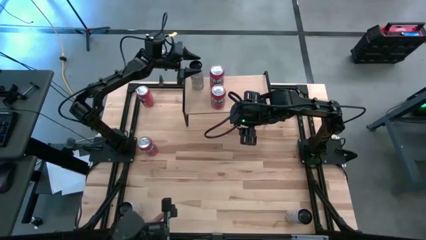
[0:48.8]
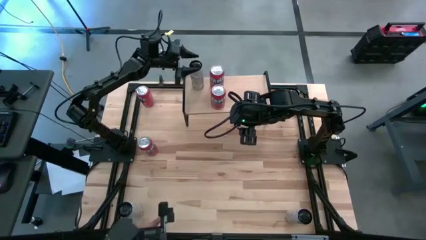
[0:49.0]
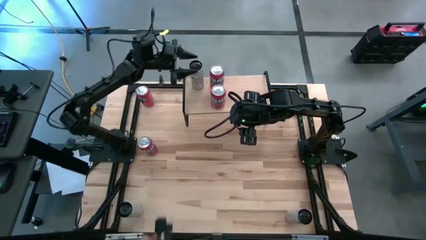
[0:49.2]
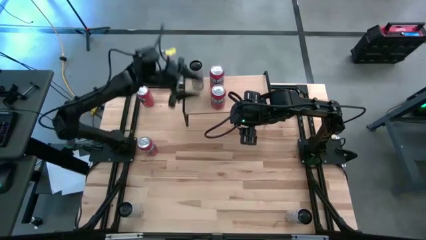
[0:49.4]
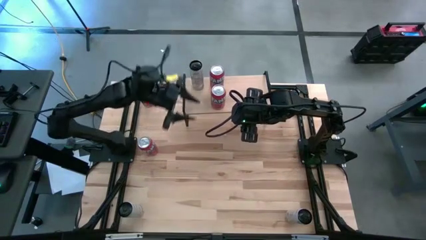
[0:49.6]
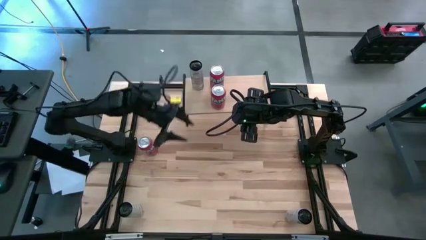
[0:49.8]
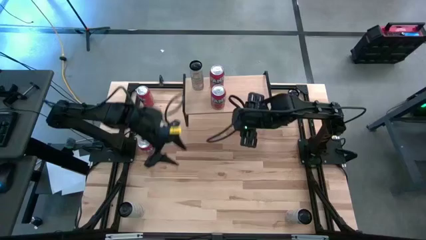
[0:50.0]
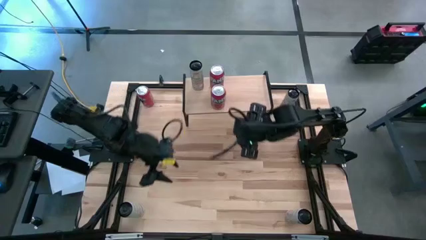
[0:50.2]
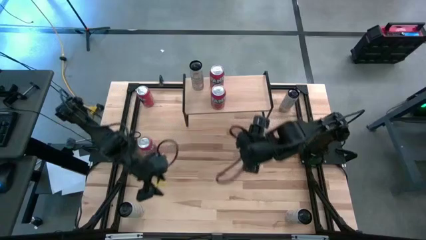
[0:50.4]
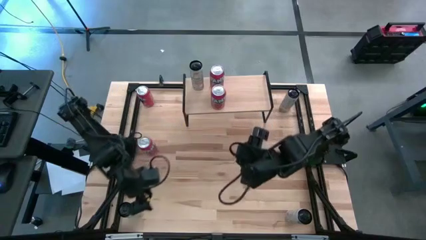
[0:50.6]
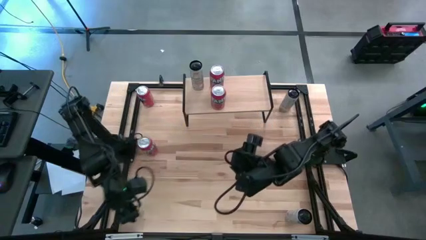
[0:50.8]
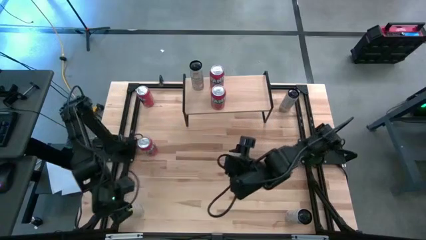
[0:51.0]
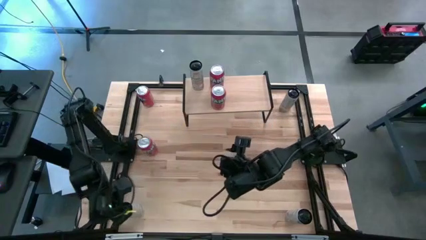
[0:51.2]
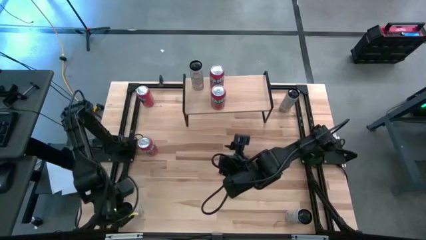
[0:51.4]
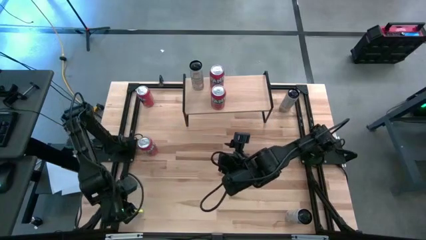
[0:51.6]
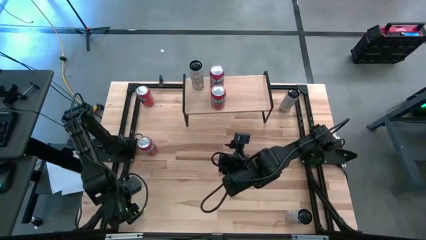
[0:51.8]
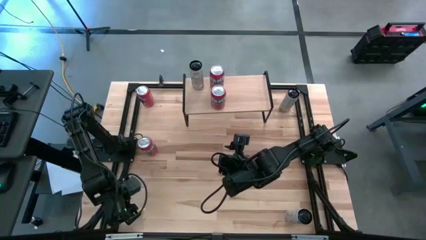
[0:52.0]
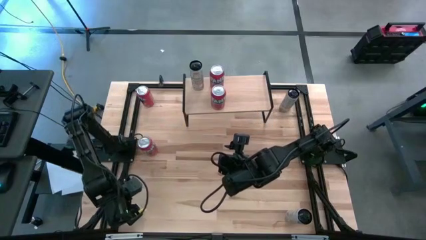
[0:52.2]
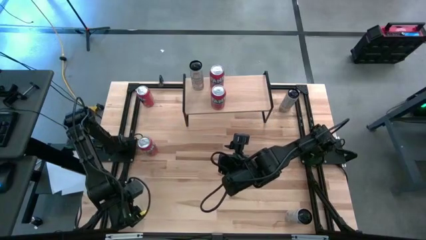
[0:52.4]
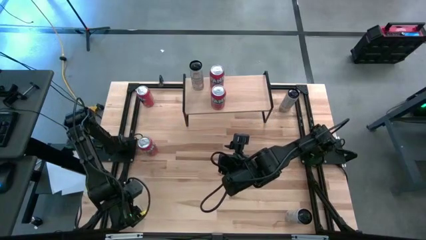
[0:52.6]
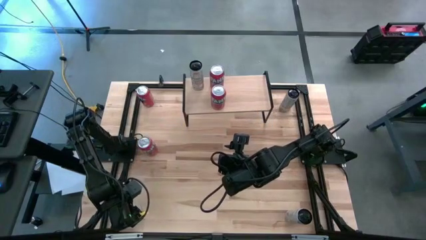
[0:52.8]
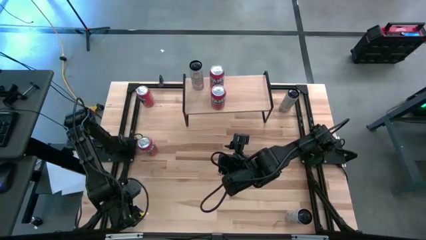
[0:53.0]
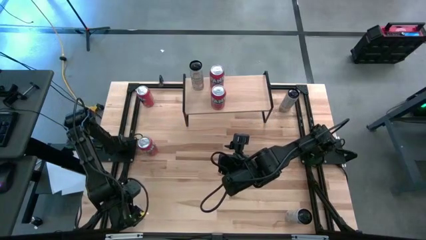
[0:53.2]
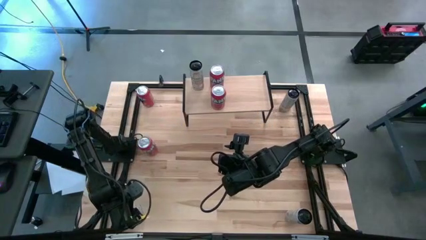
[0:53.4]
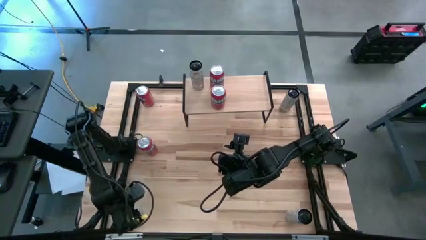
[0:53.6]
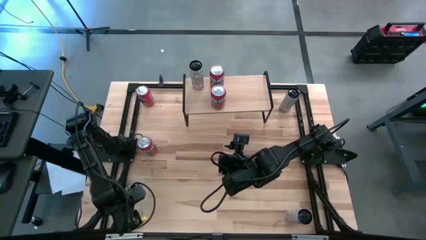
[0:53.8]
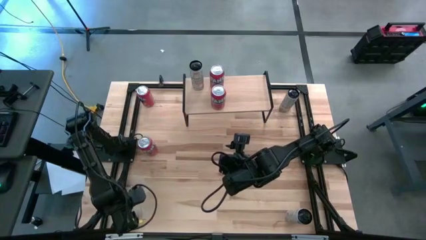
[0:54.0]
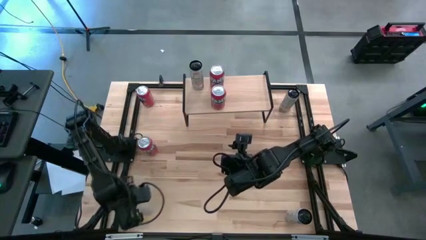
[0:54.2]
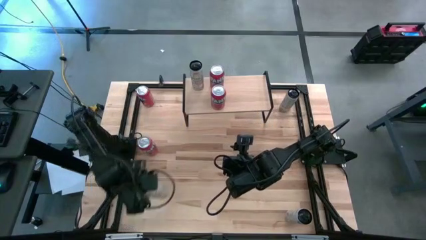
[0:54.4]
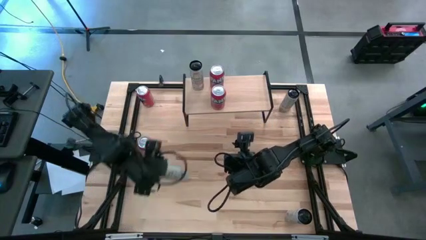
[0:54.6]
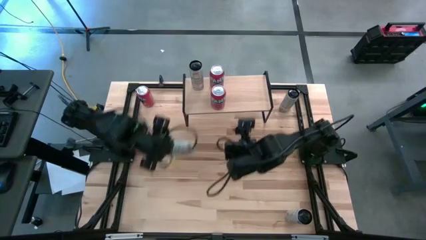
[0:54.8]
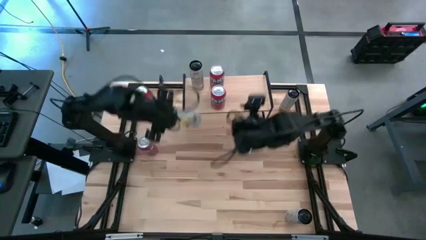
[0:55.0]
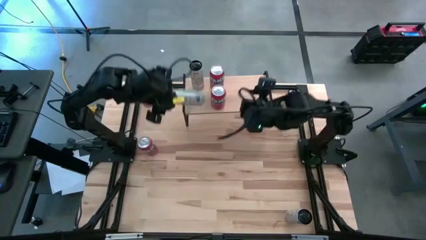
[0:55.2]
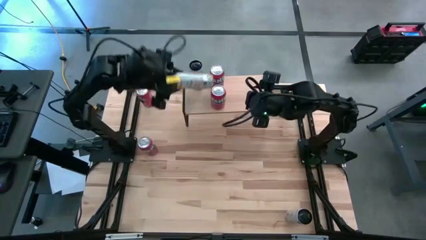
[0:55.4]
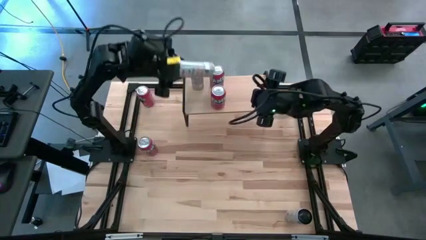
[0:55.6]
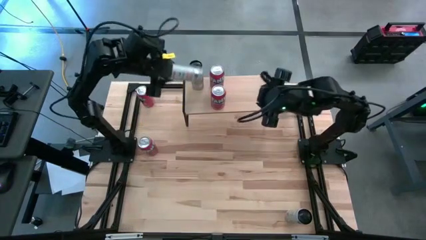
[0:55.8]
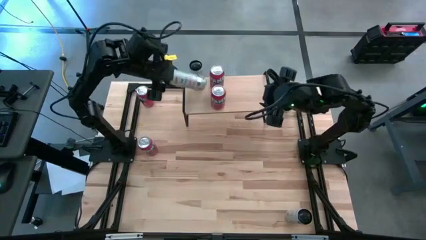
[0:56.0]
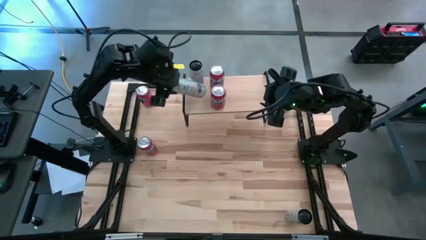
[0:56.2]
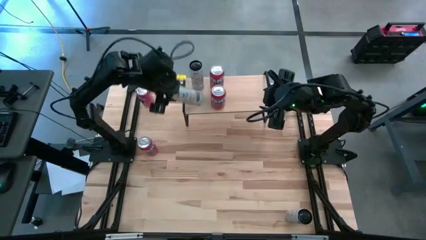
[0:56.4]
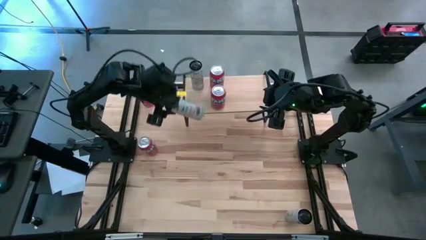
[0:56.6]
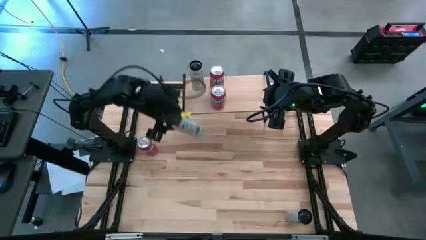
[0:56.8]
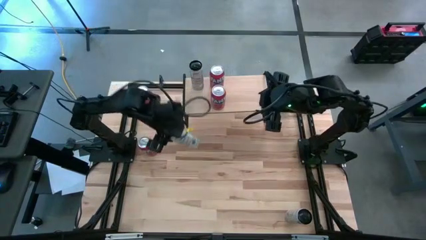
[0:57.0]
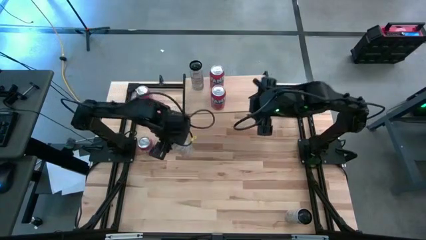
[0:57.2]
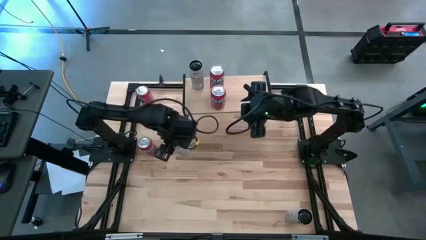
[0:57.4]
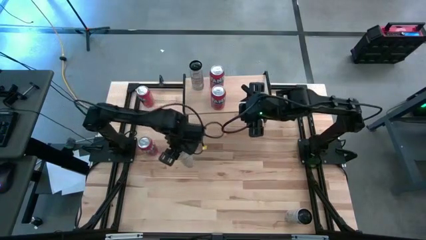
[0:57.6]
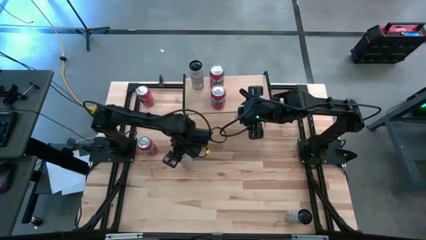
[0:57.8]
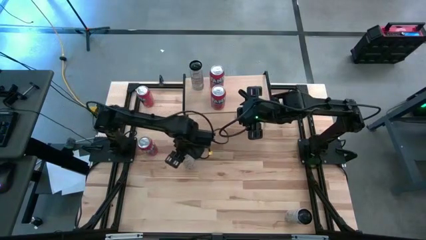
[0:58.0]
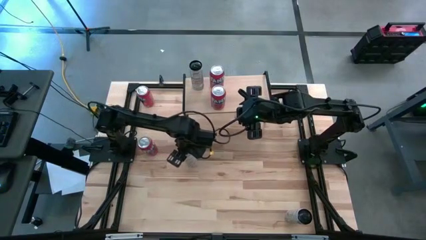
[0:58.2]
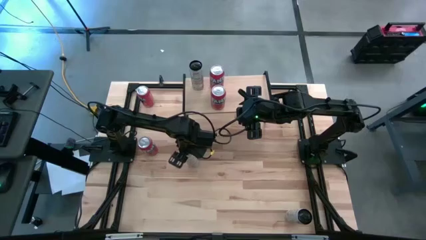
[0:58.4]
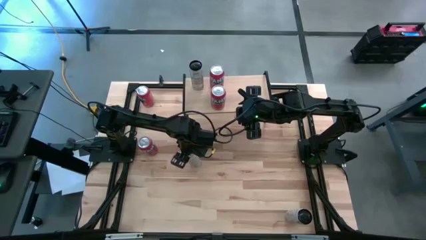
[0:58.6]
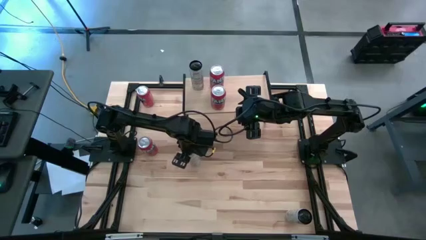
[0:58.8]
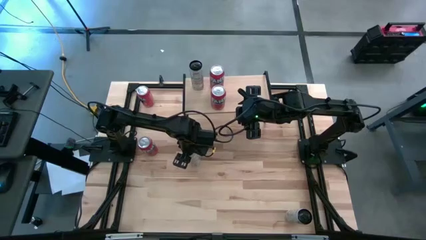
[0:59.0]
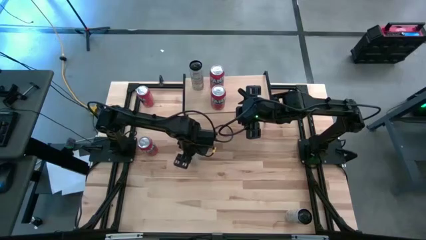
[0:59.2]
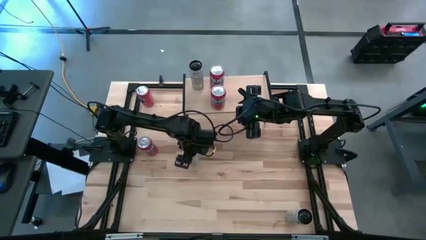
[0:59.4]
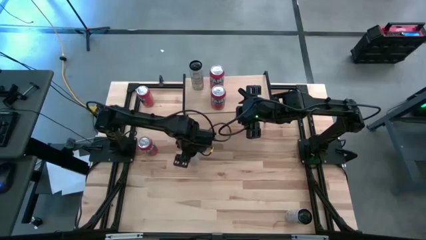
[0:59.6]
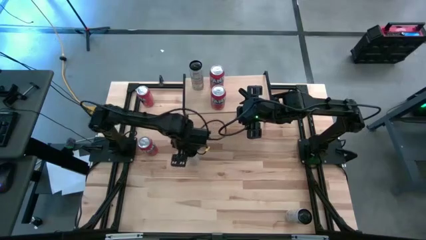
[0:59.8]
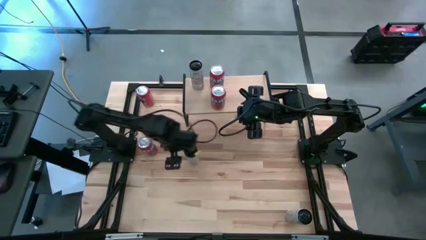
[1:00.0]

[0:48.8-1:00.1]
Task: Place canned beverage on shelf
Put the white yellow soda can on the shelf aligned with the other white yellow soda can

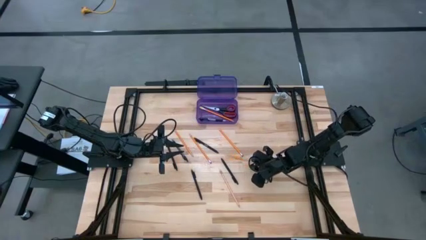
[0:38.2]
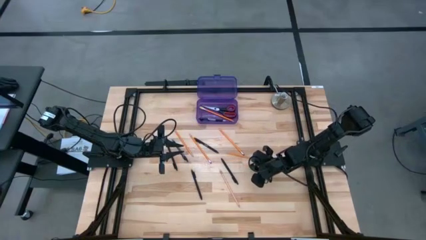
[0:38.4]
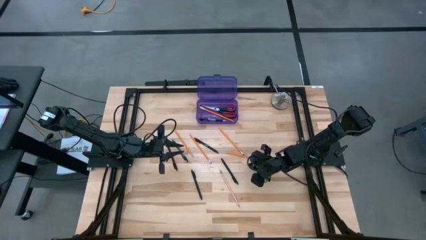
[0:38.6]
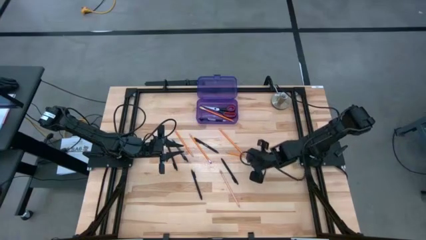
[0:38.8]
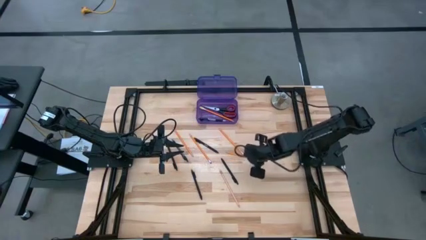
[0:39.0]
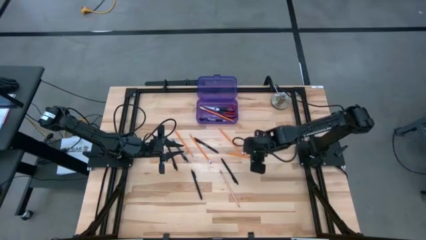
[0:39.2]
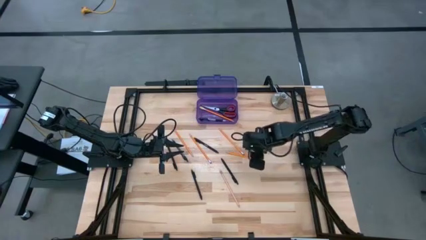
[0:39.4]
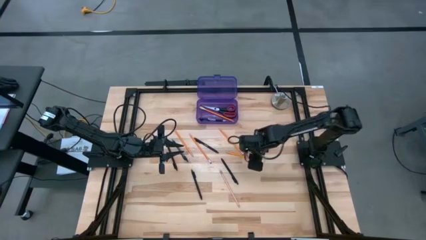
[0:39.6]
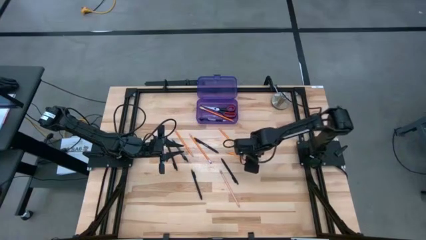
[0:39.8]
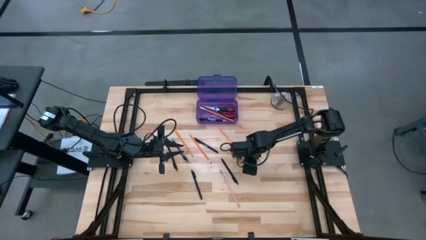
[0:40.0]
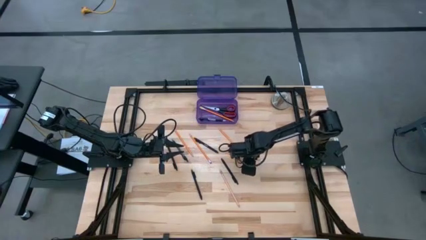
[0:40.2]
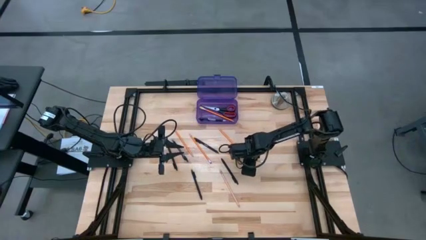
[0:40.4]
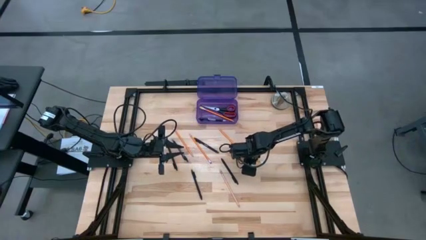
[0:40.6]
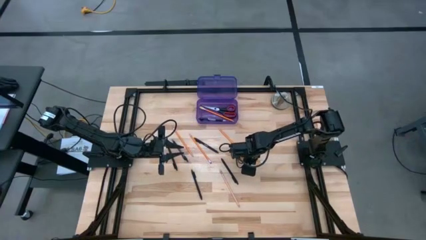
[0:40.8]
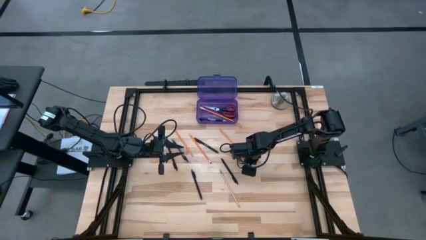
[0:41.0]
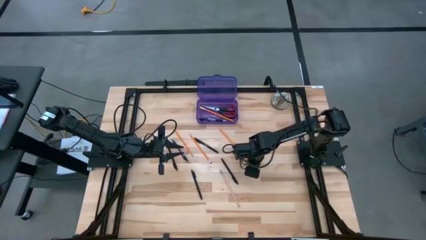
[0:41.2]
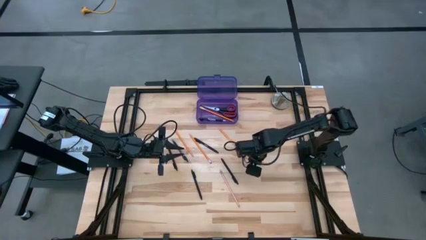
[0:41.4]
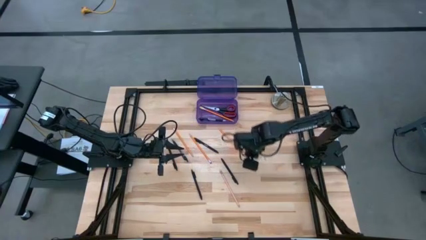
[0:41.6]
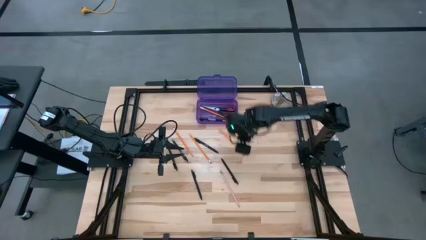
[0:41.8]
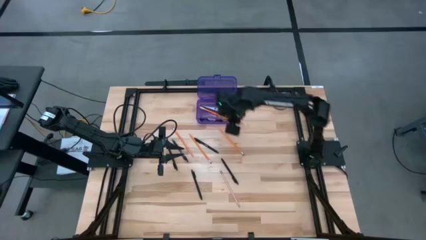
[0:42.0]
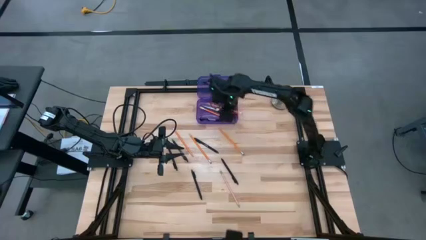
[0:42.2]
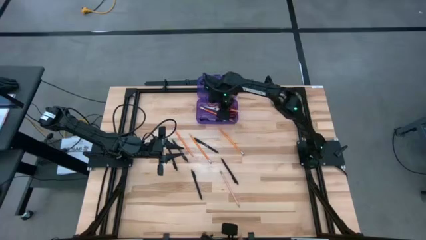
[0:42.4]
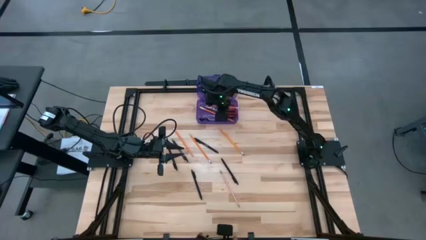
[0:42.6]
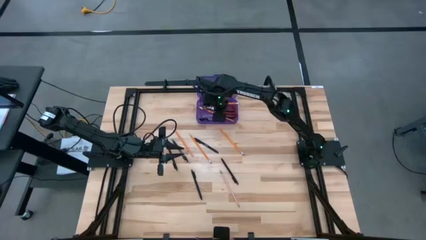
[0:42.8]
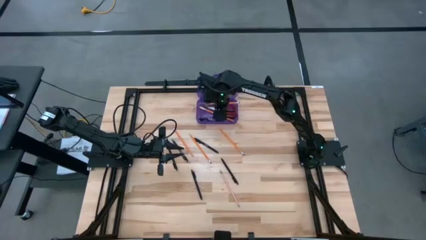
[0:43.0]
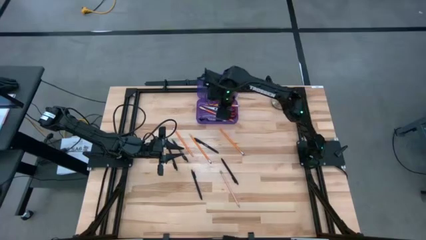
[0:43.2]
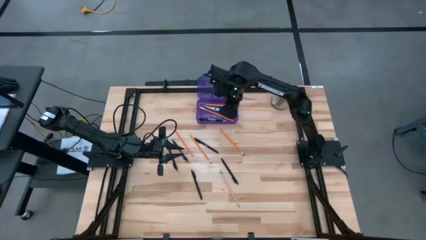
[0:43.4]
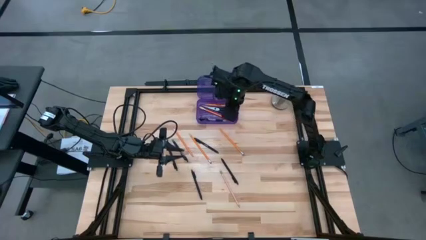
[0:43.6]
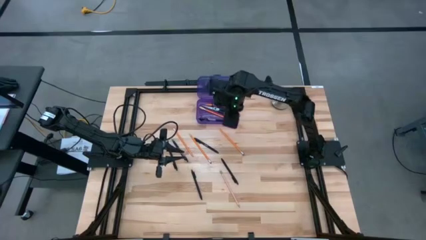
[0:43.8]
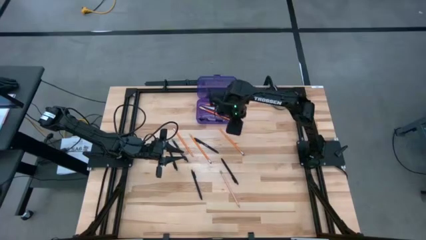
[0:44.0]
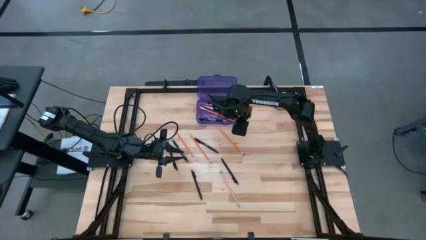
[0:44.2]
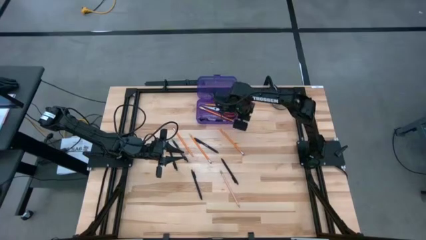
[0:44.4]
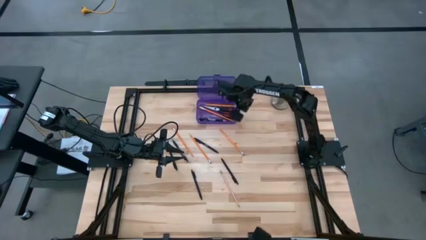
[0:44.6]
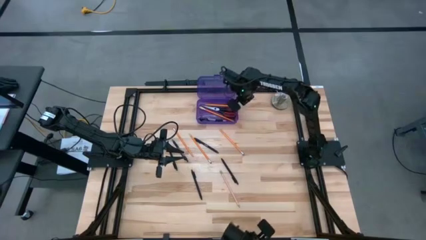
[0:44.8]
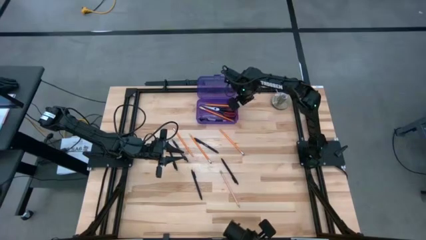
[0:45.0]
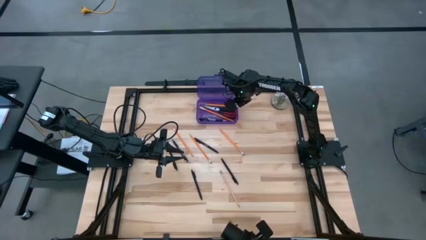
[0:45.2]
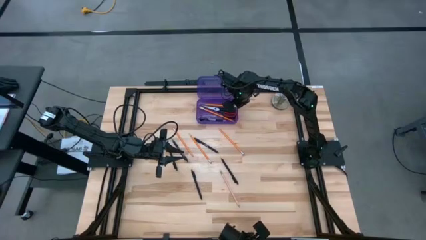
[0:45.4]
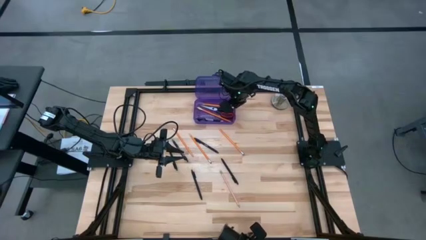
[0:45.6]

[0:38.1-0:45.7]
Task: Pick & place school supplies into a supply box
Put the yellow pencil into the violet supply box
